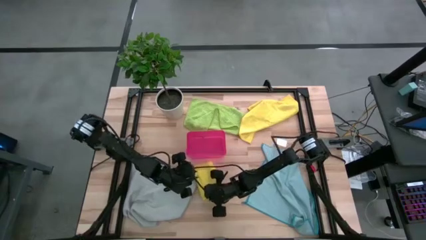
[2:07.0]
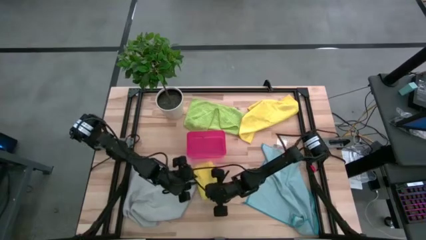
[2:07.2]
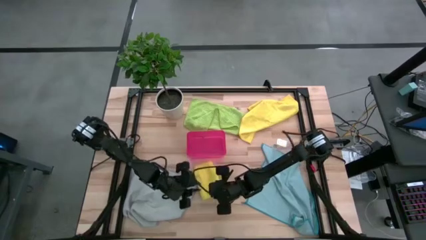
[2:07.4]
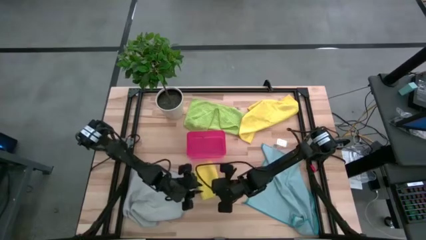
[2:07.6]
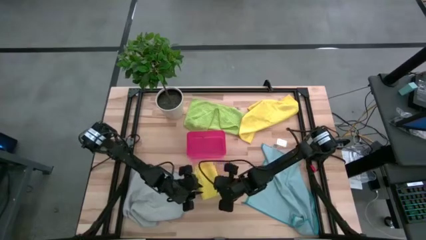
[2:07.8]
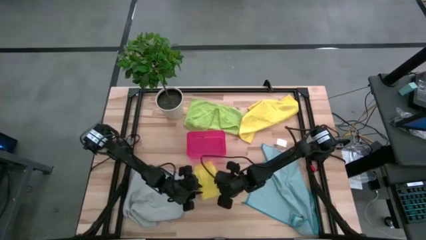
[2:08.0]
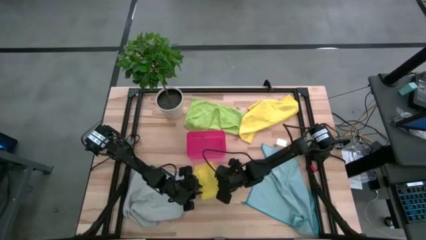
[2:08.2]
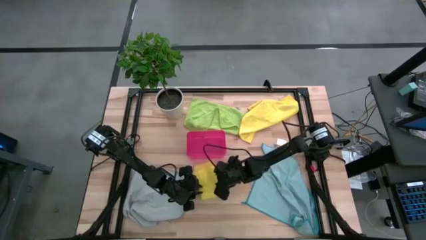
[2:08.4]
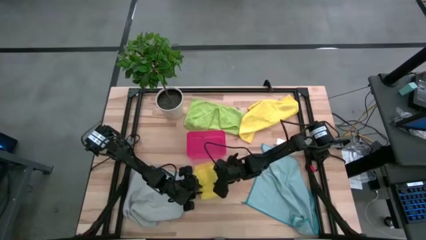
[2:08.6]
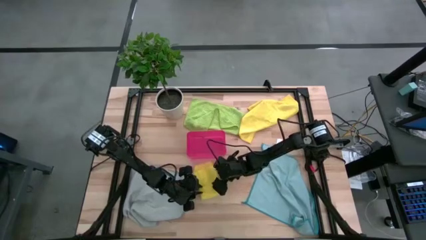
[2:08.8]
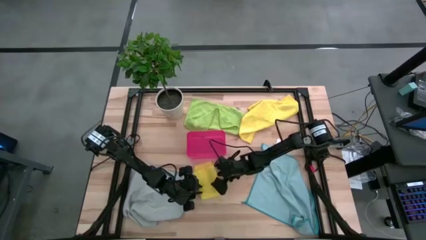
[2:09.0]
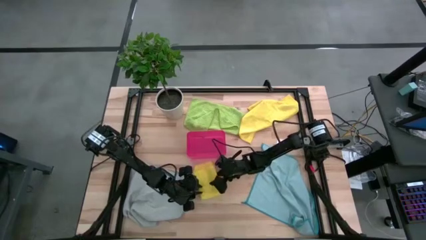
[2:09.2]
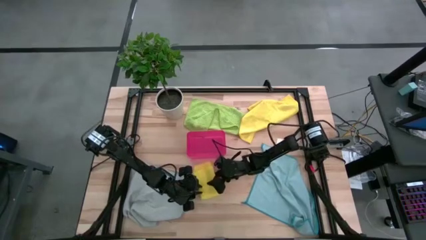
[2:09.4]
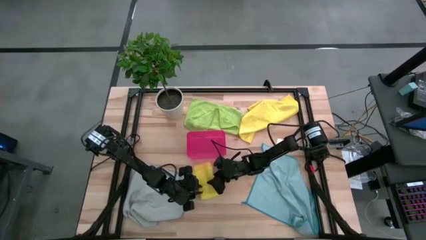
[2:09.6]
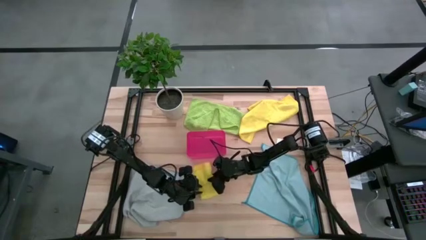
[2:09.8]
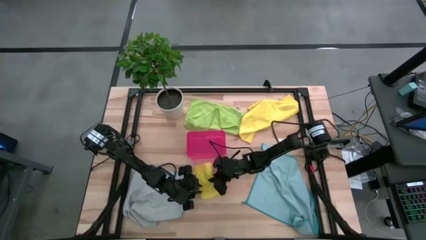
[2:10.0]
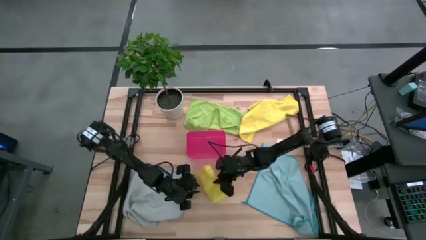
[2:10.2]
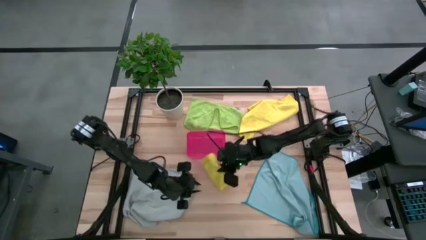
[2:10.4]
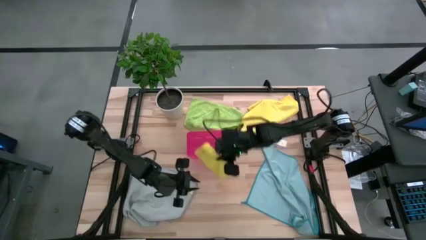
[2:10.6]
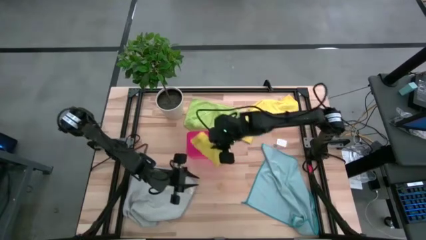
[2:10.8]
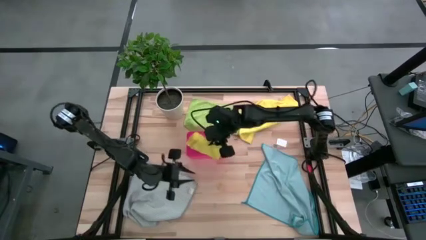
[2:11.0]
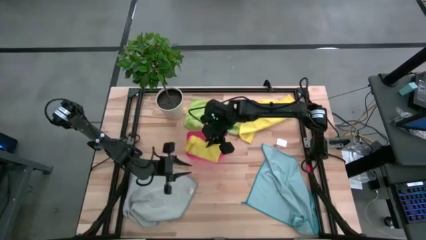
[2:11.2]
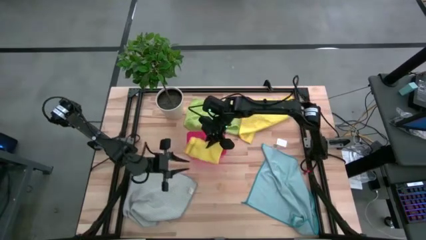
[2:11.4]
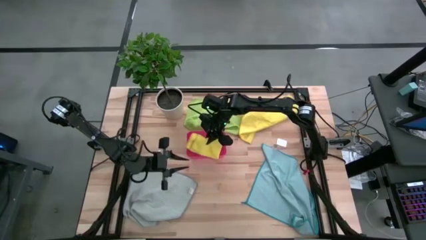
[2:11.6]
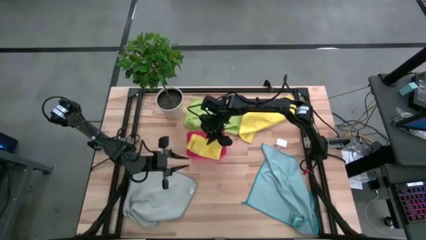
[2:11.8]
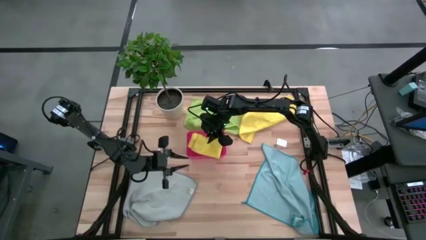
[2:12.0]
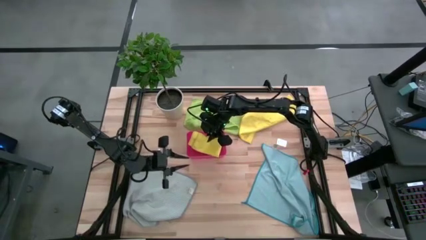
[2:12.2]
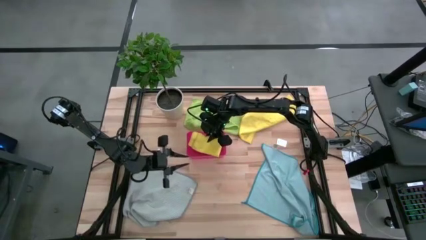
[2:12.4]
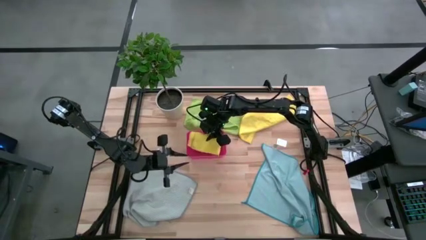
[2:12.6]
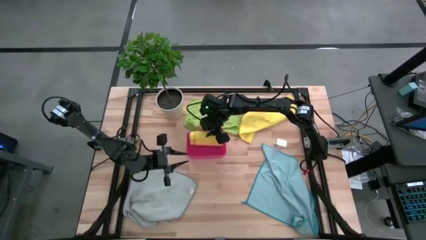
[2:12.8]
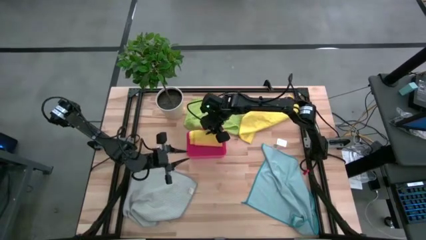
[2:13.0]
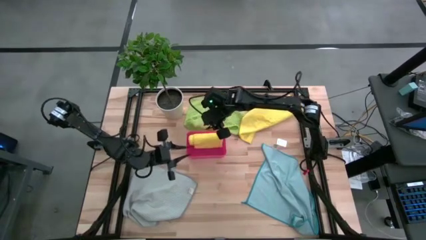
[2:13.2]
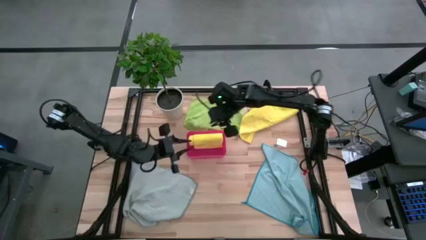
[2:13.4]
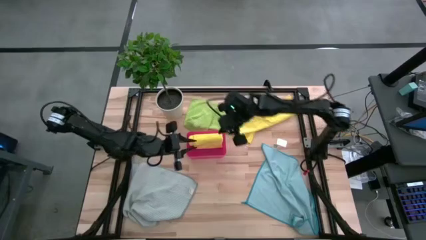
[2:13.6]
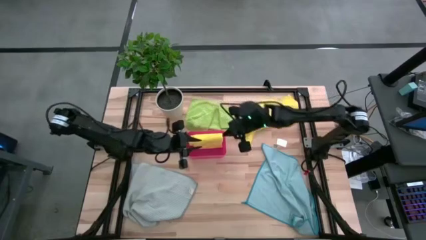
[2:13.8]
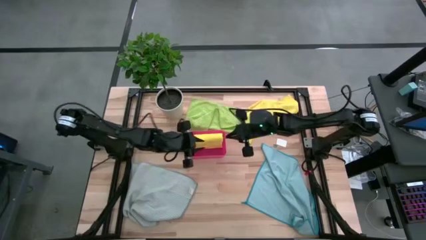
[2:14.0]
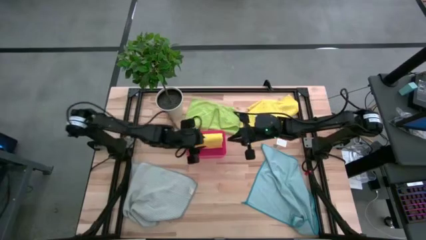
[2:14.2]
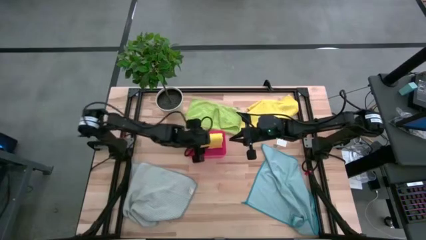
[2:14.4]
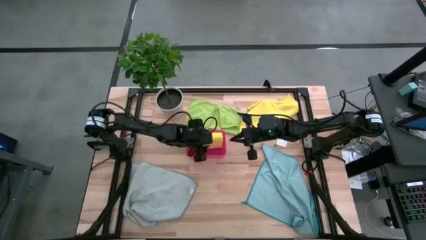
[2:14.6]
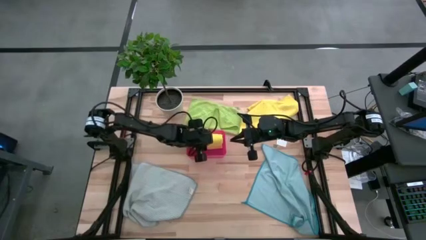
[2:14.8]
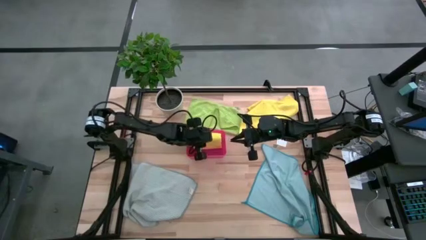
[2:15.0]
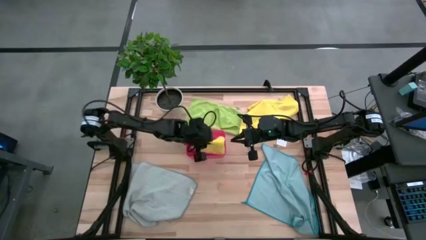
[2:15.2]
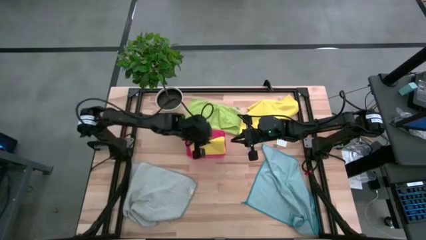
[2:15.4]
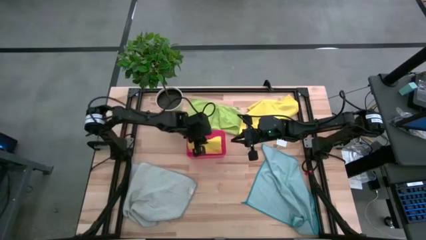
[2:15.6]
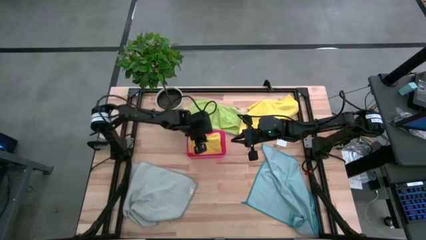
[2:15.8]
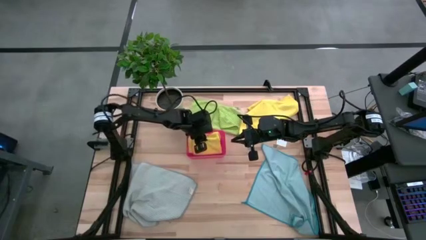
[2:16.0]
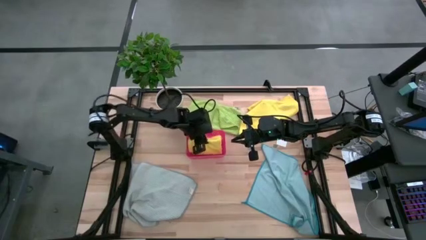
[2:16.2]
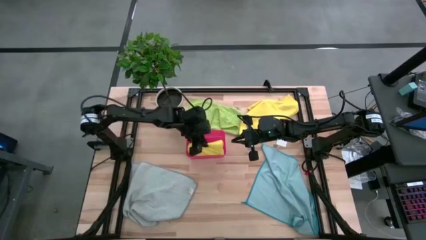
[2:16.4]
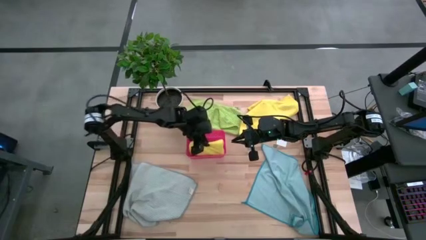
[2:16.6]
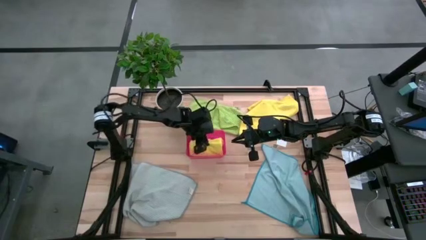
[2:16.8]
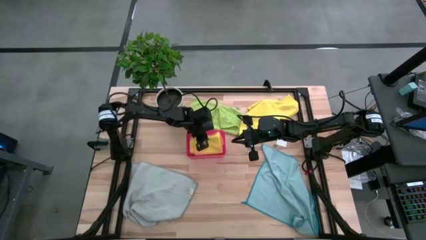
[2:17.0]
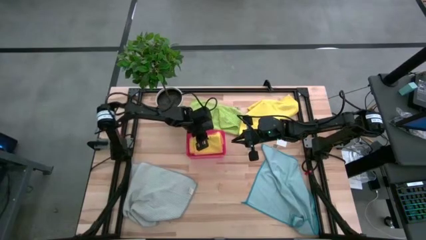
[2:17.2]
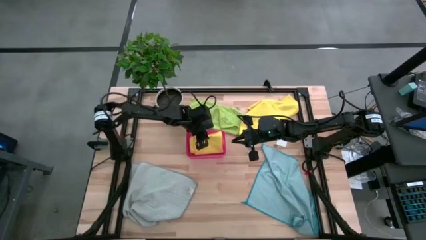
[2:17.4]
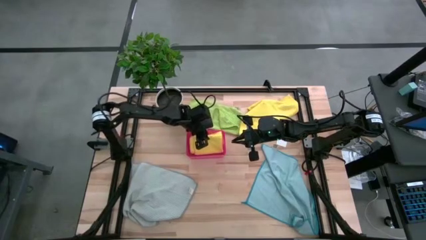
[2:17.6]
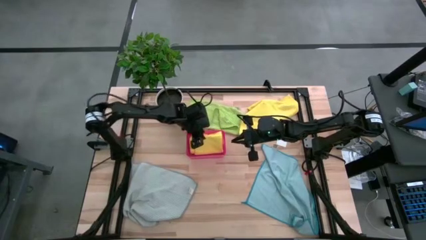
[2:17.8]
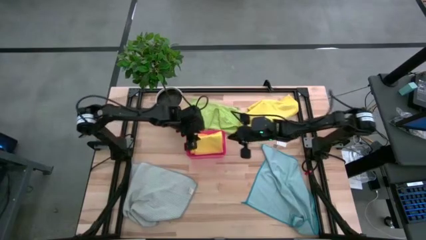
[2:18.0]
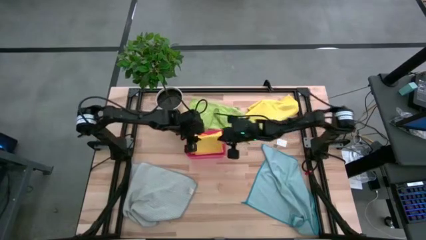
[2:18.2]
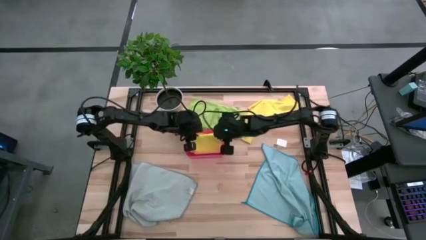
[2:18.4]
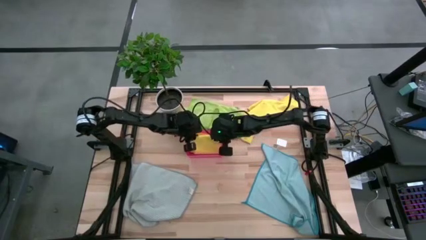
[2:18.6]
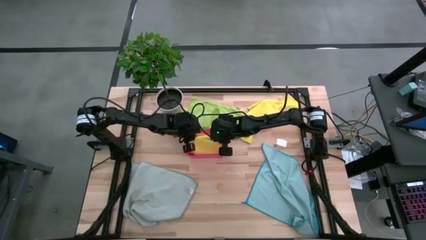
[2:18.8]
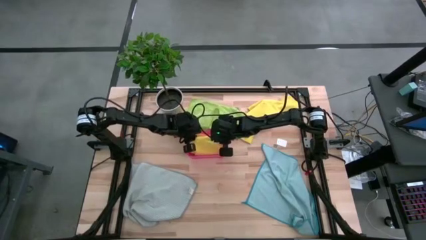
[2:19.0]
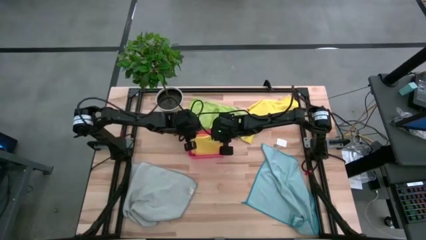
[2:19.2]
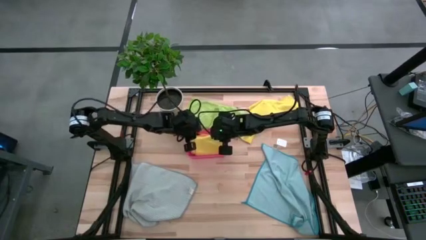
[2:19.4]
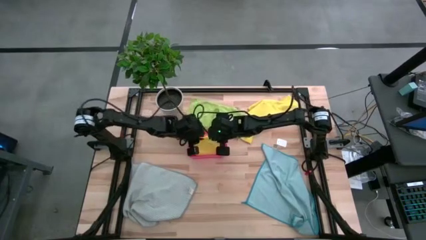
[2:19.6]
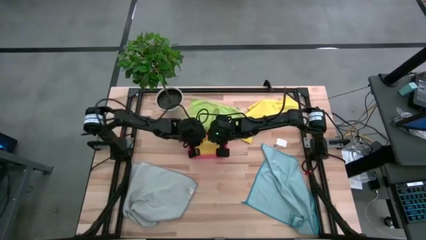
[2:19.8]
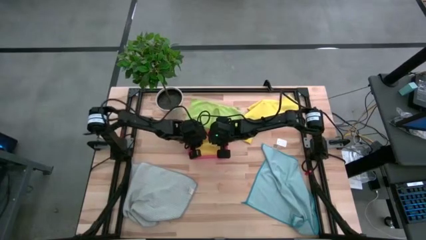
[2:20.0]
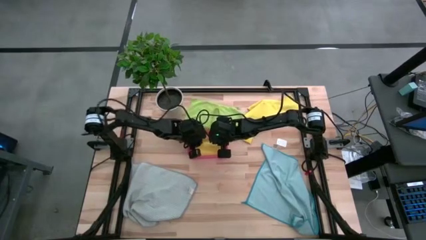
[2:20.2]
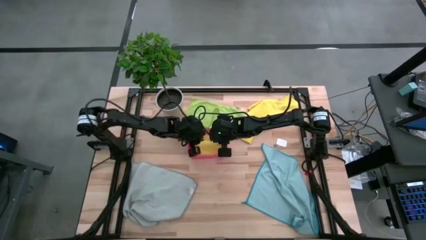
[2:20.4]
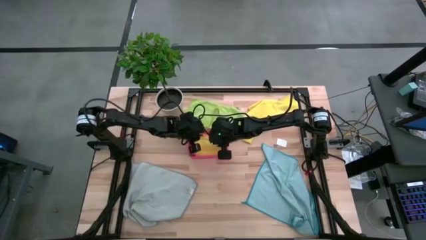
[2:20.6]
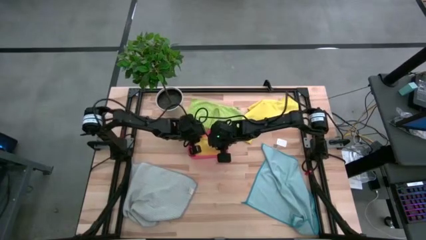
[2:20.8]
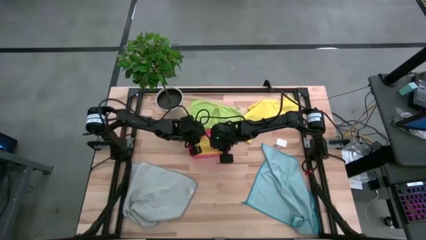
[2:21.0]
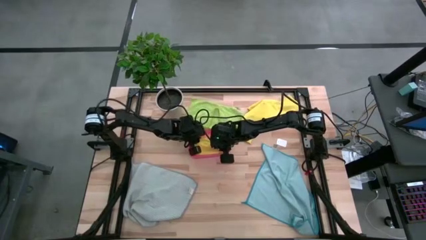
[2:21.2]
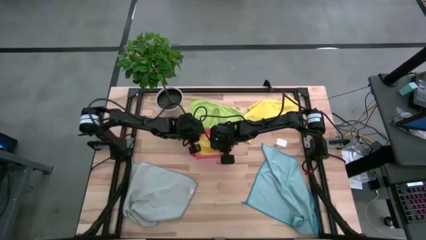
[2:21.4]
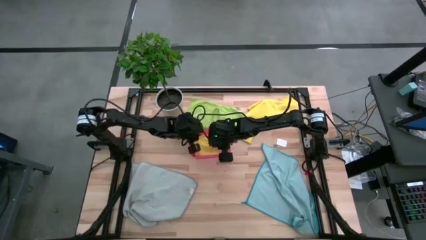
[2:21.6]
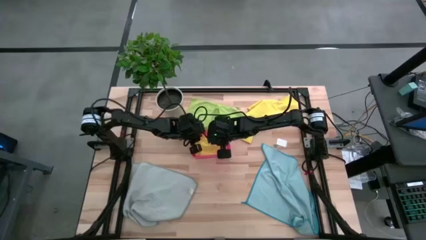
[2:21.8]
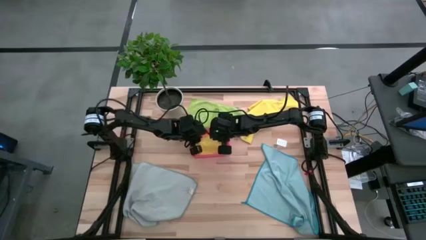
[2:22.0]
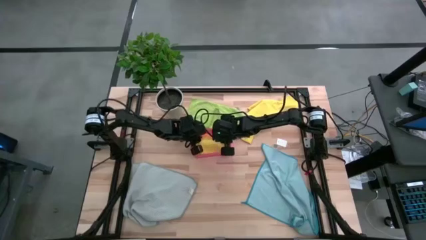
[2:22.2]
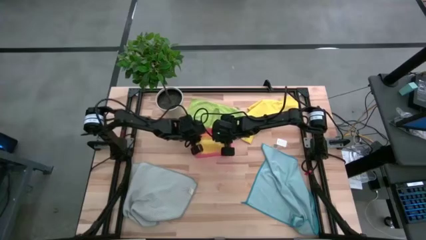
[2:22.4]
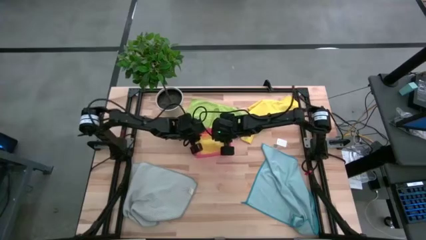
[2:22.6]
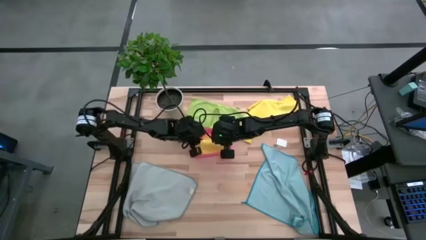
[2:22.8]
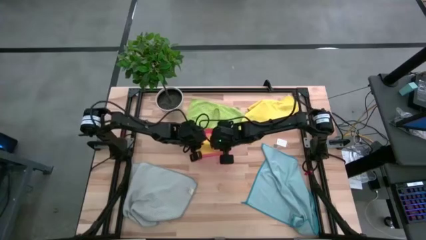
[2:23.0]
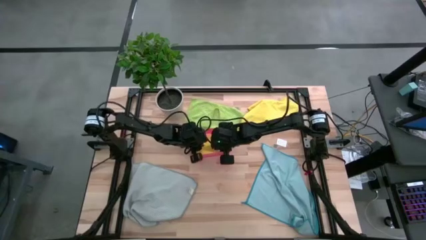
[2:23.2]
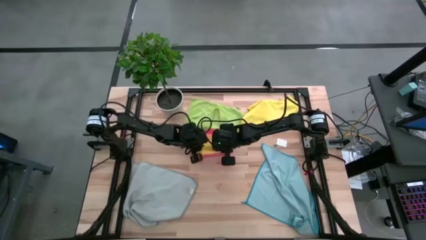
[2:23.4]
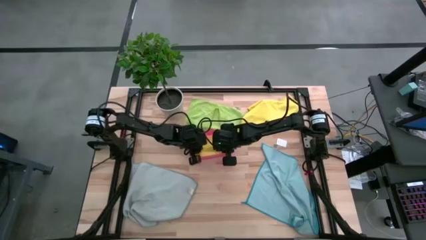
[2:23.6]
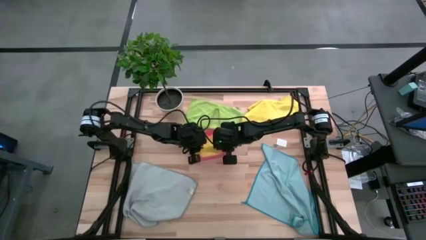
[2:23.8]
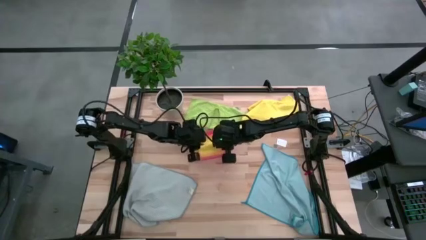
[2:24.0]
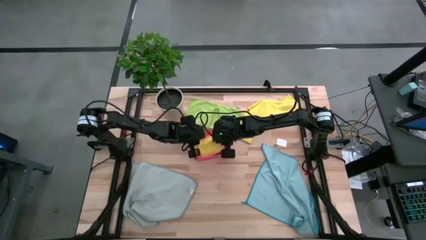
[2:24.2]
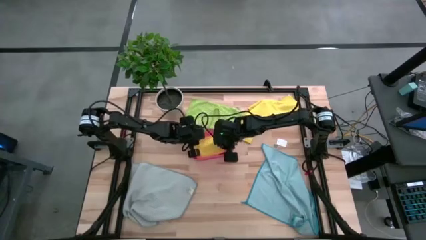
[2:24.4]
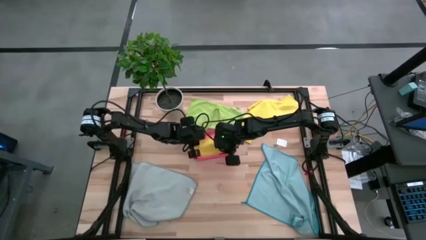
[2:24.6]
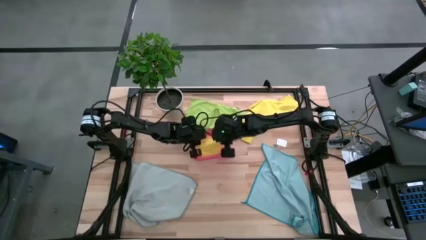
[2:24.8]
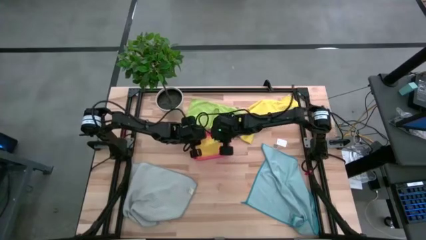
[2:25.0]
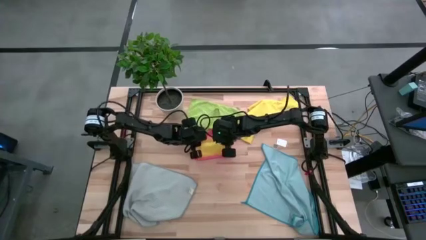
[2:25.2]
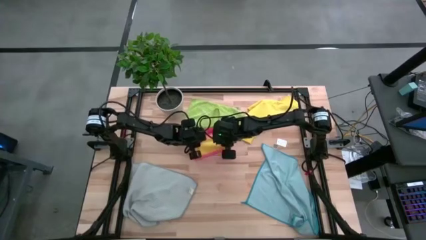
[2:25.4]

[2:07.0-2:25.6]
Task: Fold microfiber towels
Put the folded yellow microfiber cloth into the pink bin
